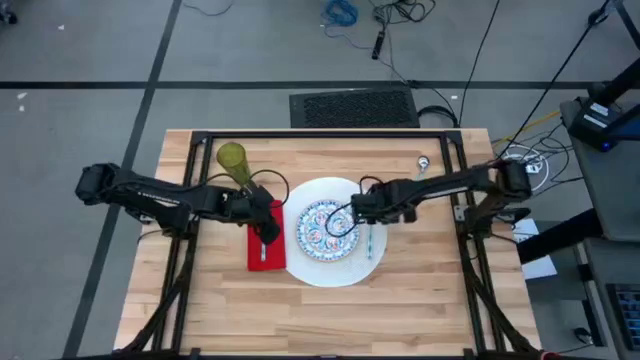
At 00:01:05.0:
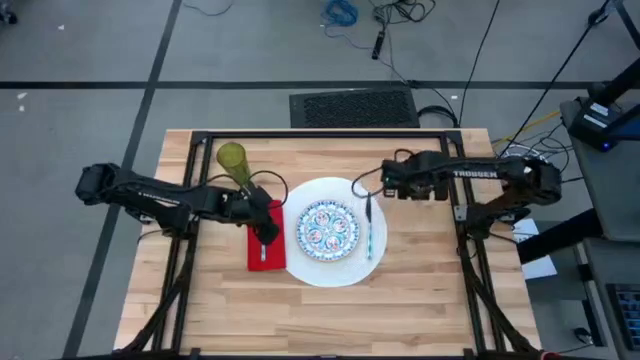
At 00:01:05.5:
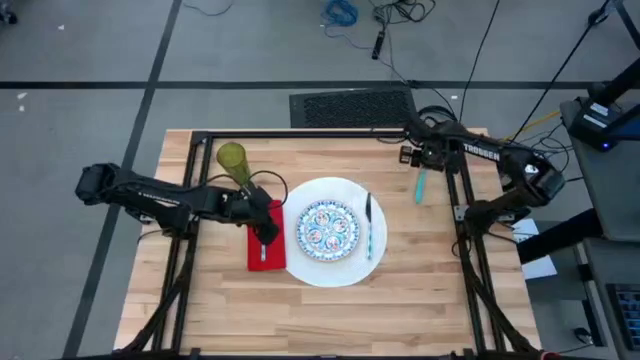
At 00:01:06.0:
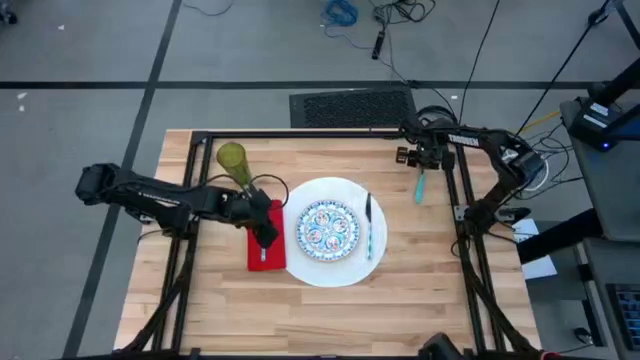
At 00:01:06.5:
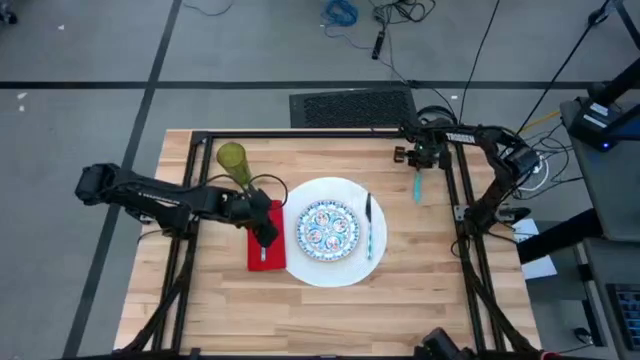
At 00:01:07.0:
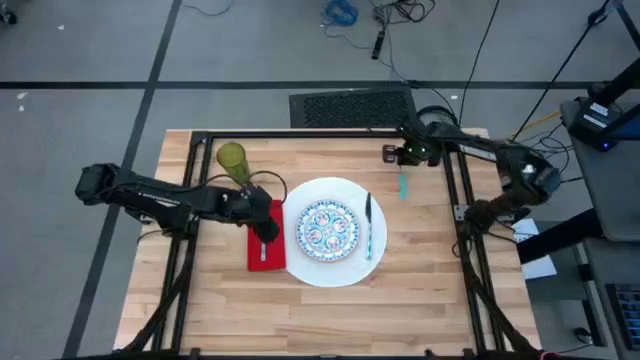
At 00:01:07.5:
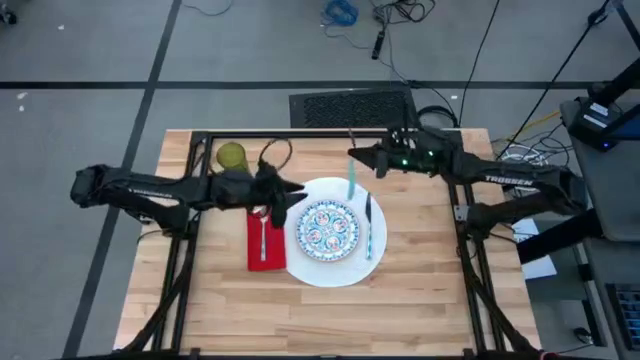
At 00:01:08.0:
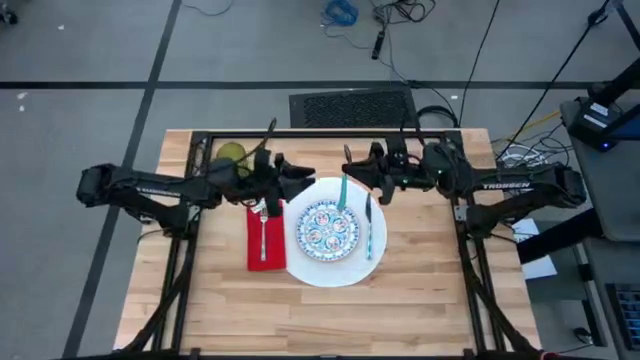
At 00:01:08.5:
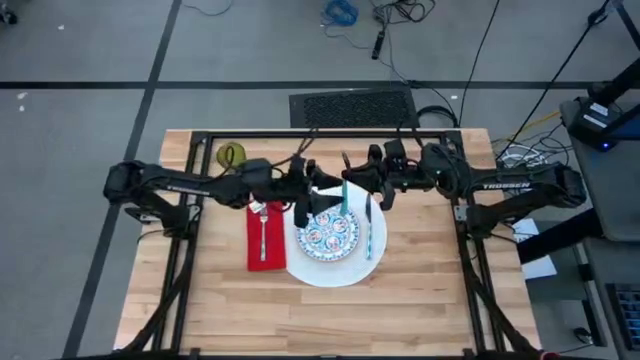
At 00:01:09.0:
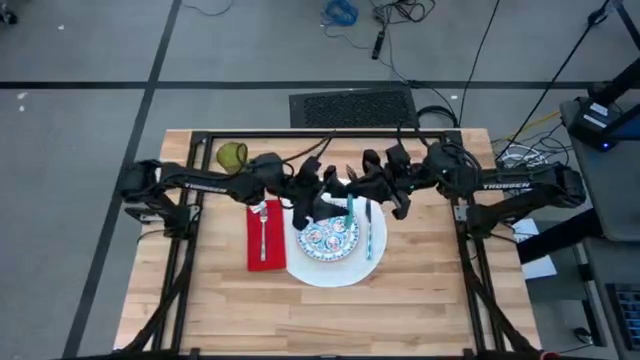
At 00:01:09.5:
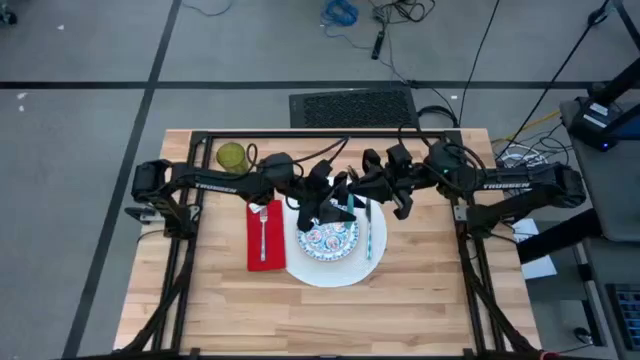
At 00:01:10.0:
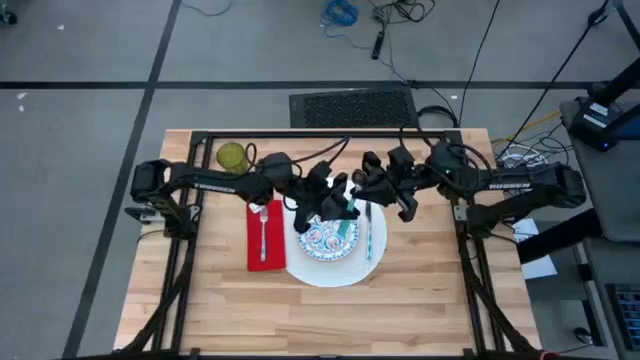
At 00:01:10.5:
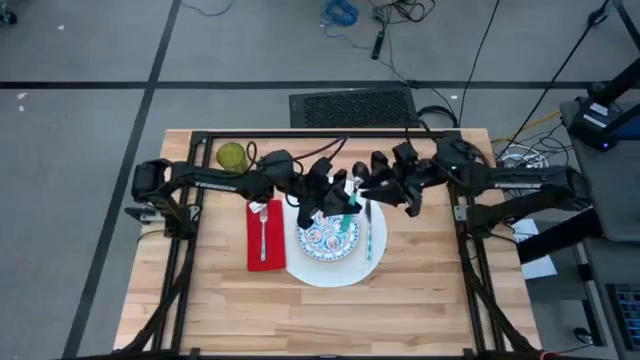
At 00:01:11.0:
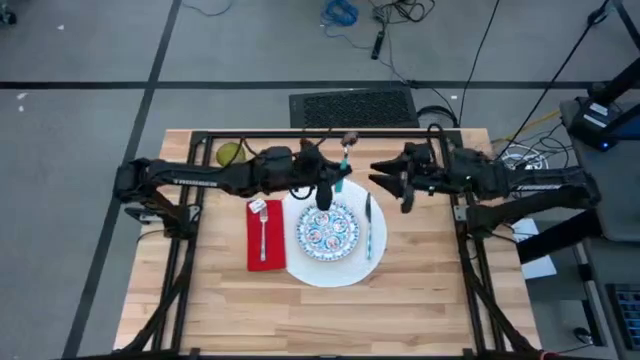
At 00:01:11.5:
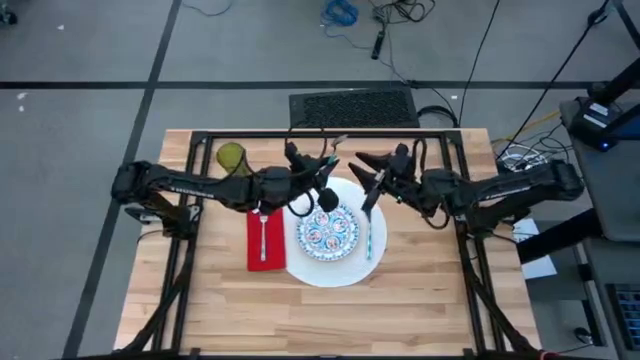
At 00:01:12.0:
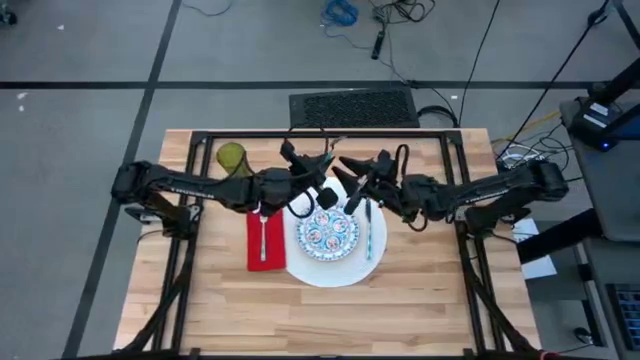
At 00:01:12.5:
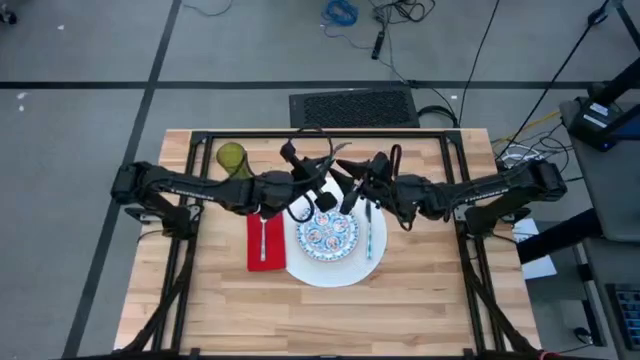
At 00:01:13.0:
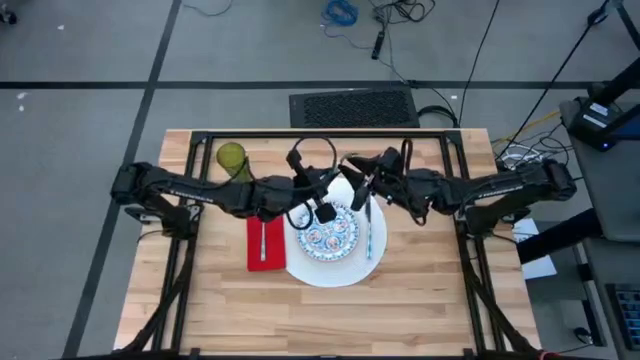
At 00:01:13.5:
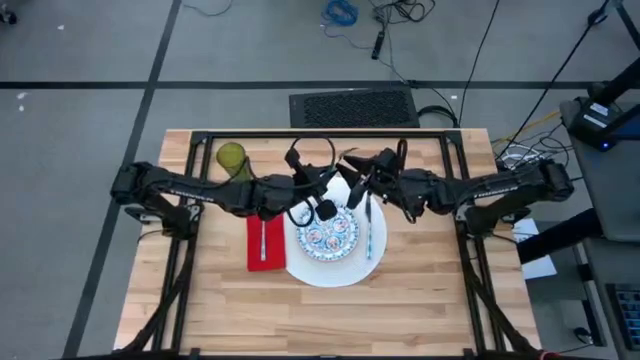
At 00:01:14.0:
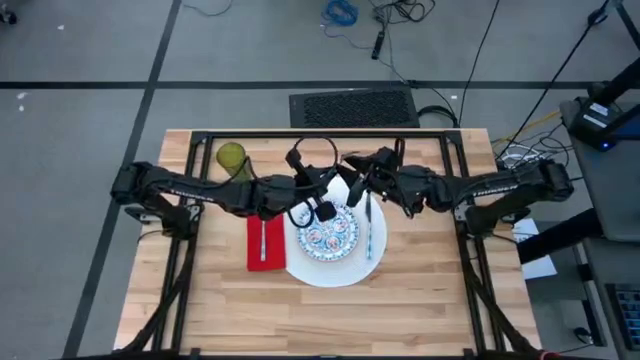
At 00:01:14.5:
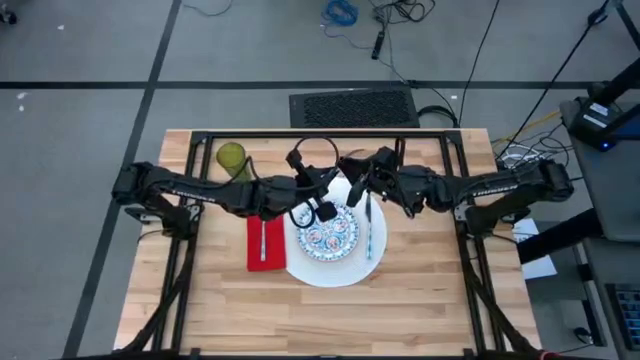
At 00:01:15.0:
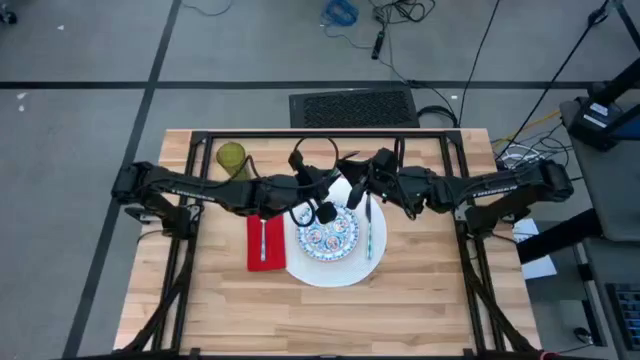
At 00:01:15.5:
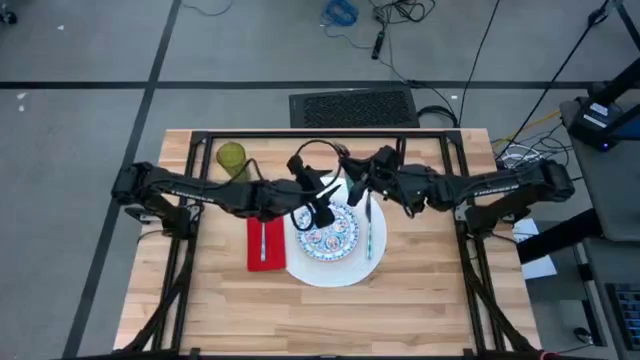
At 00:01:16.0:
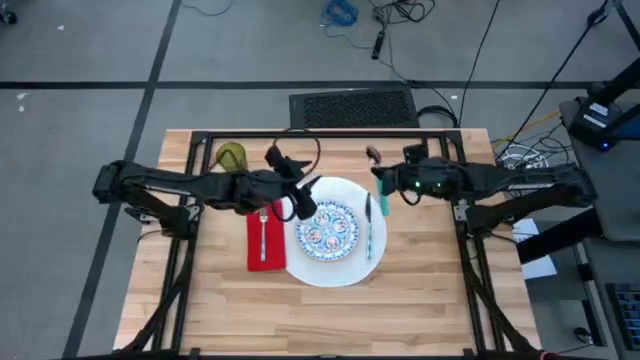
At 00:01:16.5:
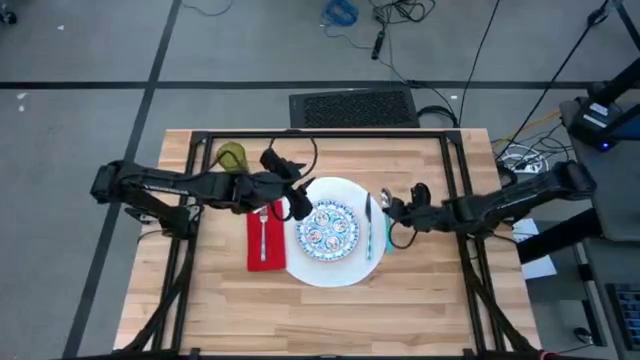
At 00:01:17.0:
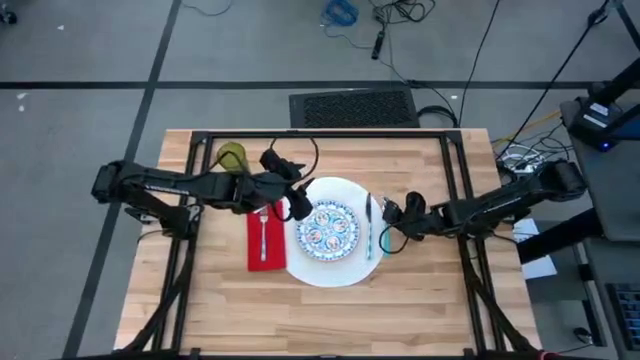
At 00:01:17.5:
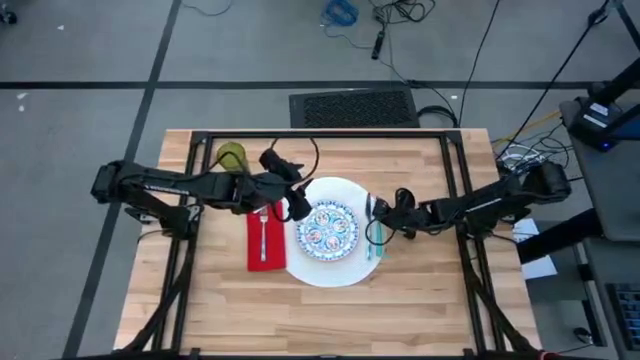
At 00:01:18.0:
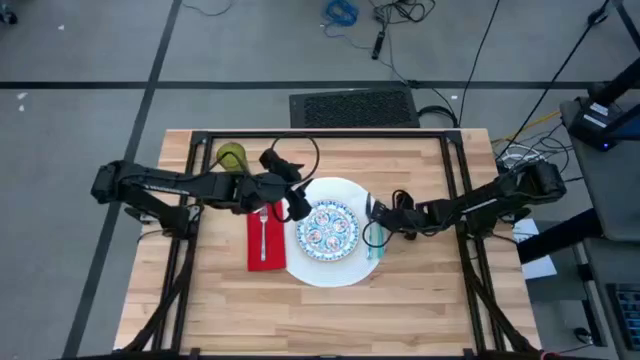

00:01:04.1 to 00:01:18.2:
Task: Set table place
Put the light green spoon between the white table knife and blue patterned plate on the white tablemat

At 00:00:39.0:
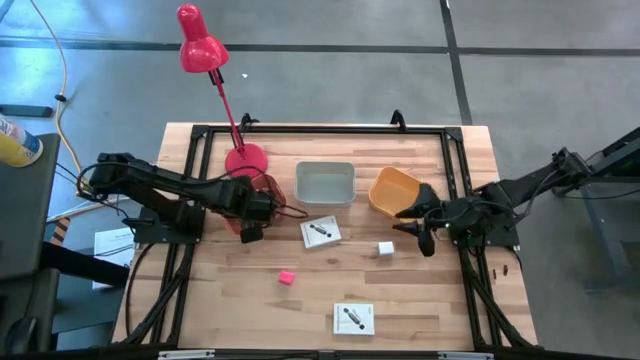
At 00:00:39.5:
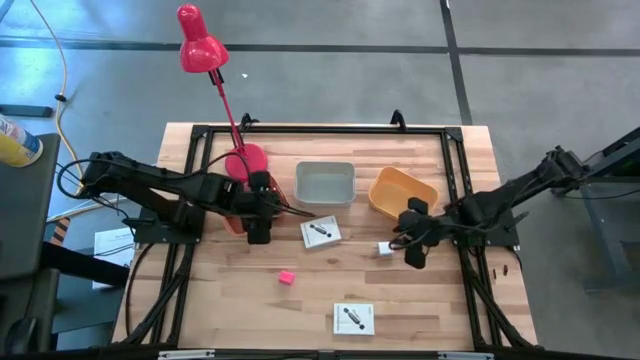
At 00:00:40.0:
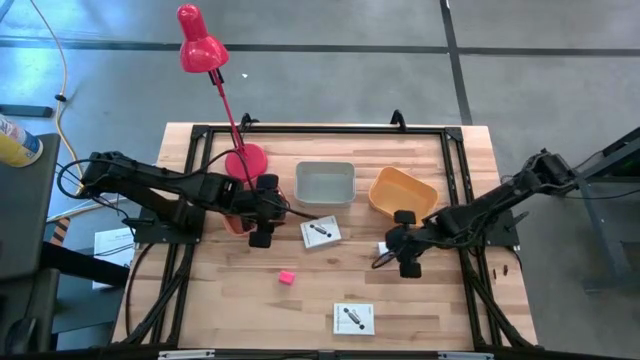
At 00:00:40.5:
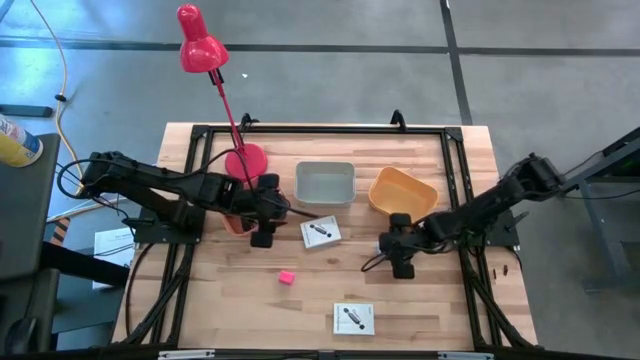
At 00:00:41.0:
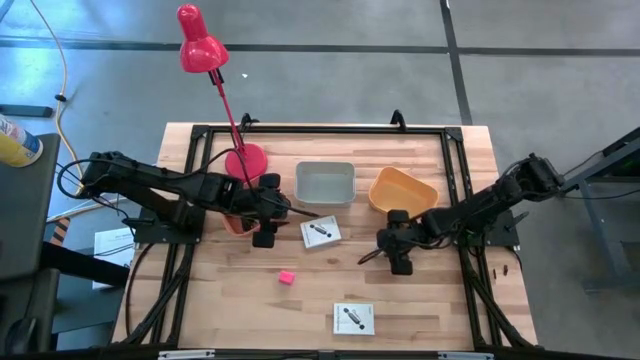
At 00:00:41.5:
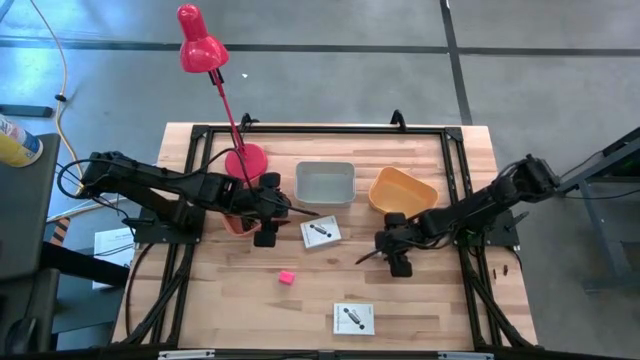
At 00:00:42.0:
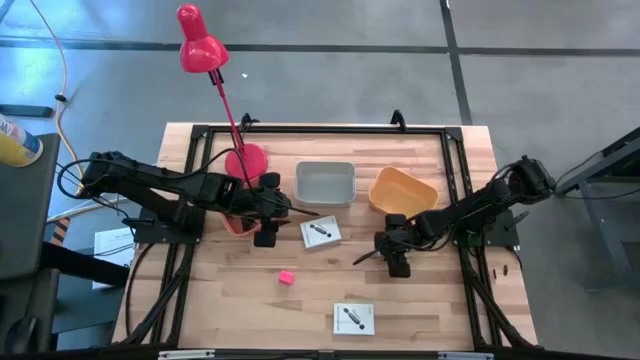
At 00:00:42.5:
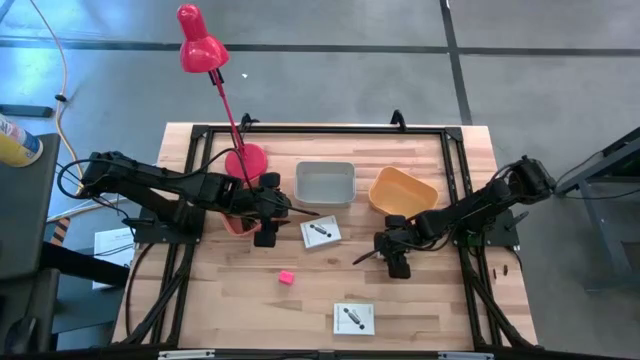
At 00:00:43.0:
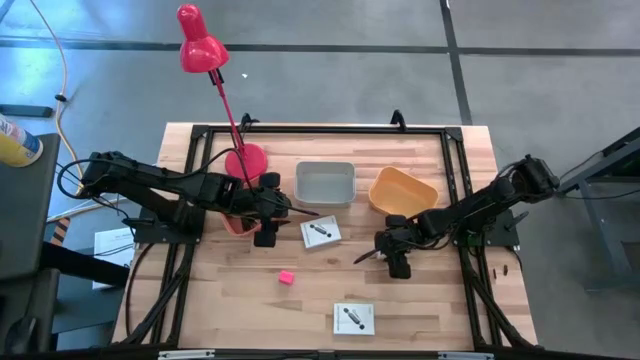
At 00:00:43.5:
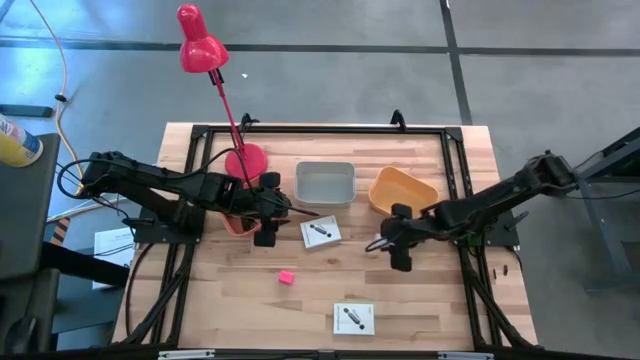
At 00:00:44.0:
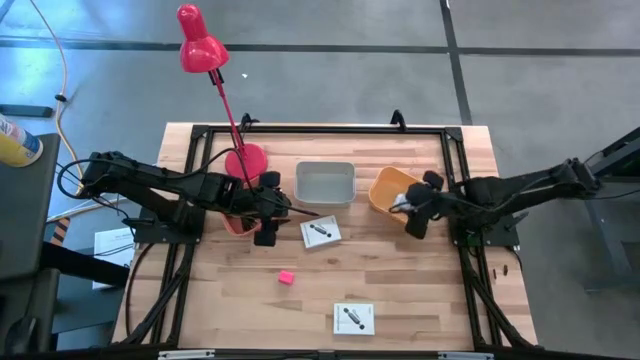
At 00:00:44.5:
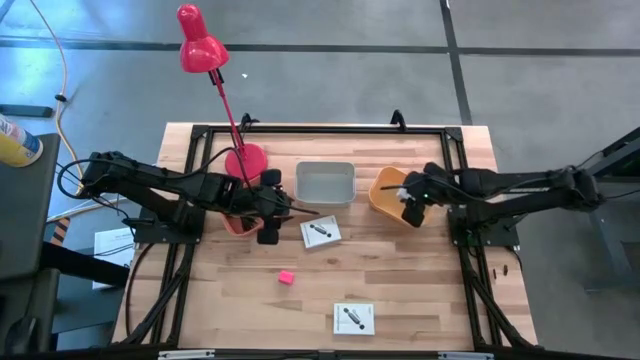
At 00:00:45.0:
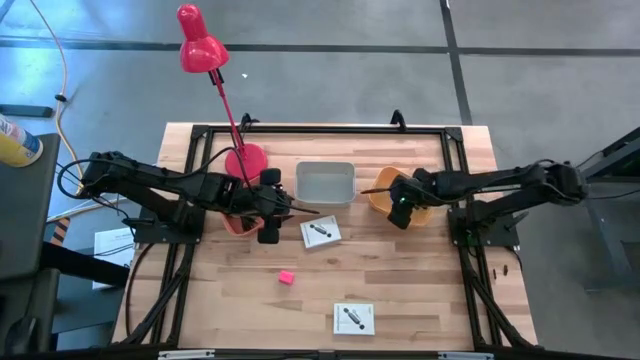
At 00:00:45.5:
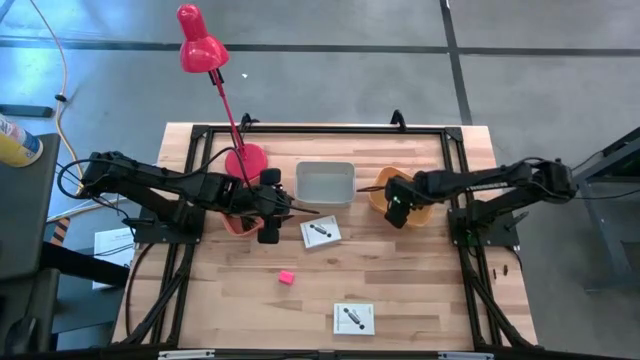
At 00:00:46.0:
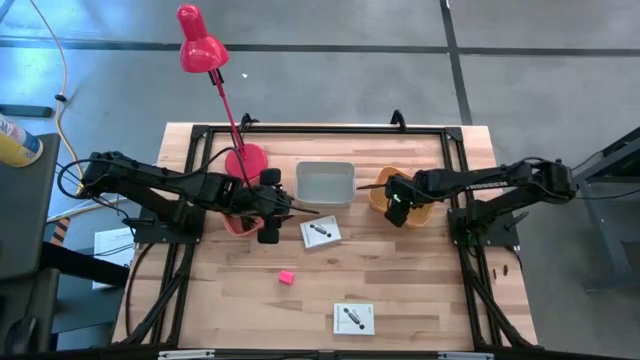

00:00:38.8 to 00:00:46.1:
Task: Pick and place items into bin
Put the white charger adapter into the orange bin
